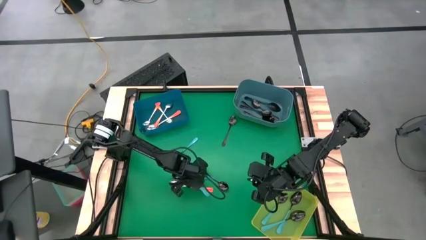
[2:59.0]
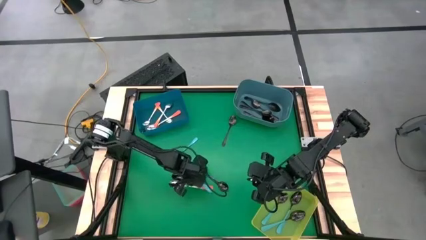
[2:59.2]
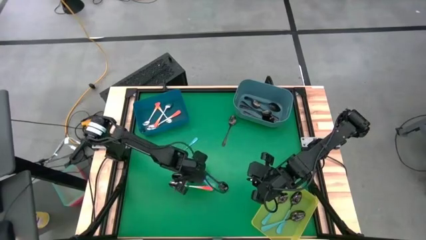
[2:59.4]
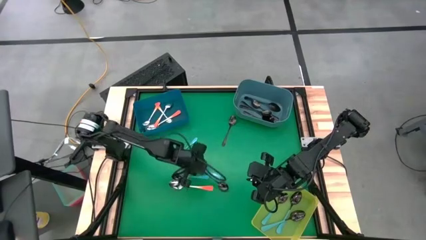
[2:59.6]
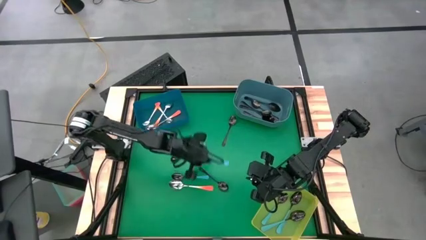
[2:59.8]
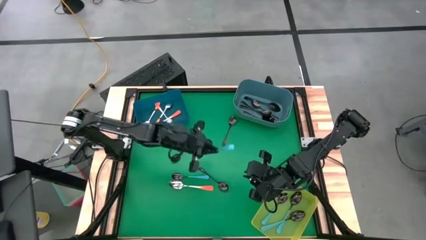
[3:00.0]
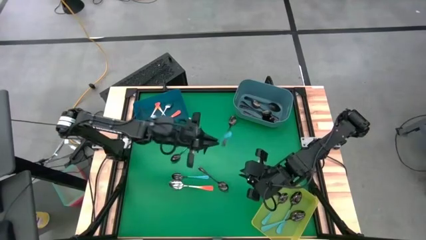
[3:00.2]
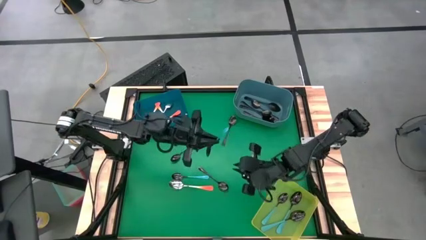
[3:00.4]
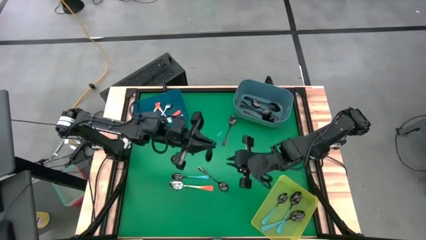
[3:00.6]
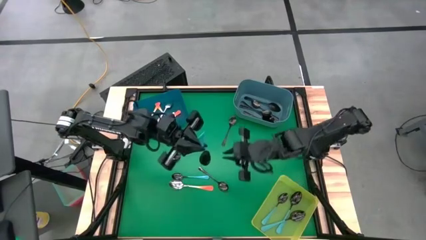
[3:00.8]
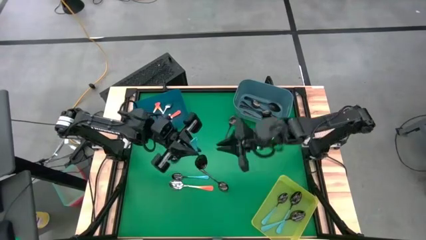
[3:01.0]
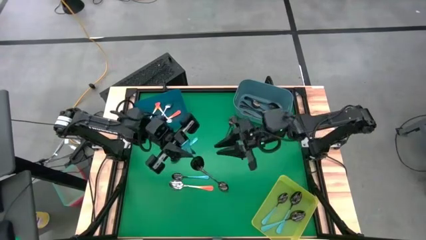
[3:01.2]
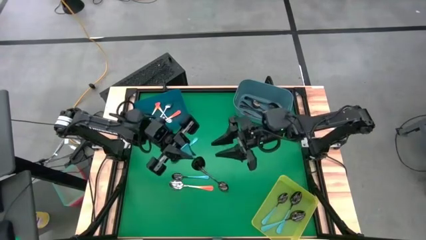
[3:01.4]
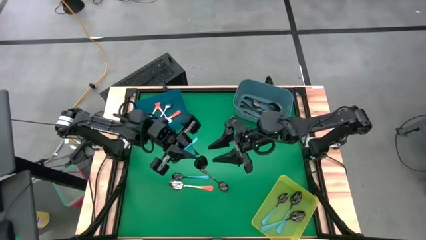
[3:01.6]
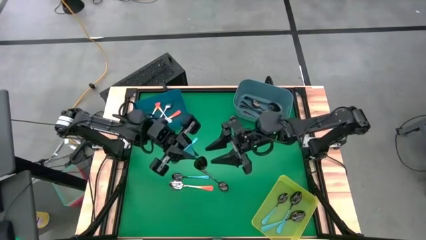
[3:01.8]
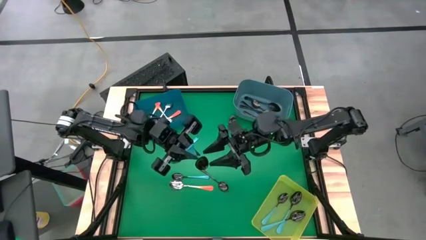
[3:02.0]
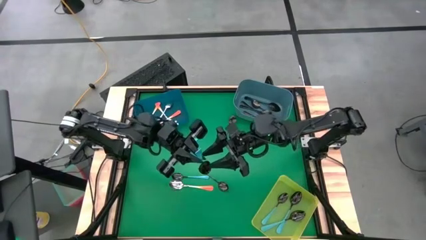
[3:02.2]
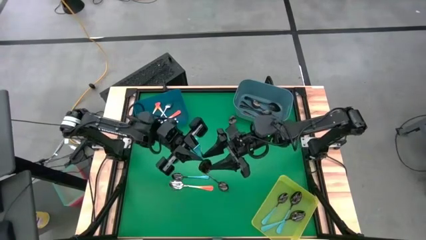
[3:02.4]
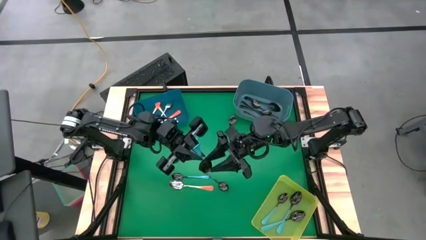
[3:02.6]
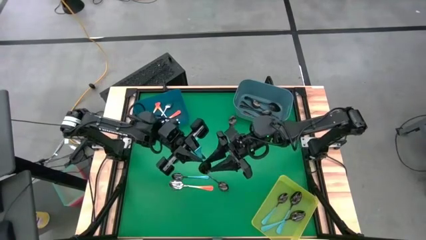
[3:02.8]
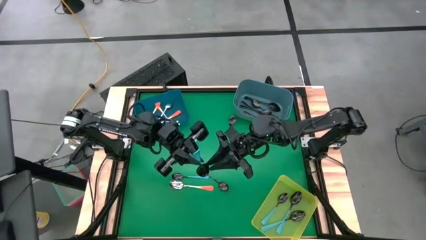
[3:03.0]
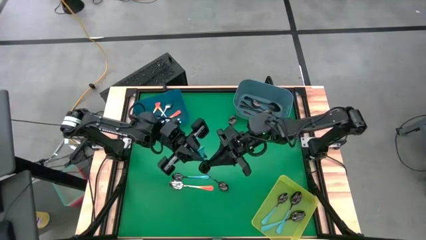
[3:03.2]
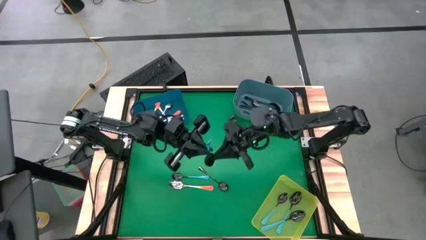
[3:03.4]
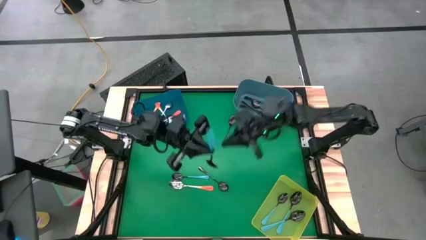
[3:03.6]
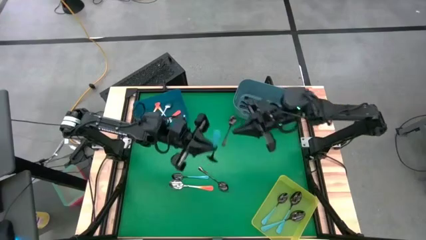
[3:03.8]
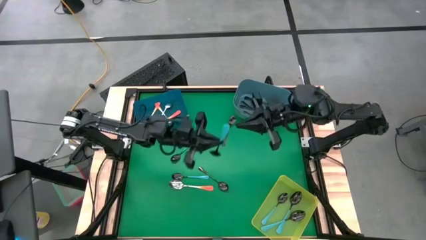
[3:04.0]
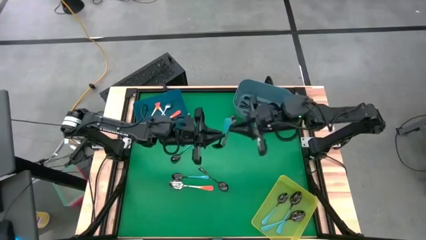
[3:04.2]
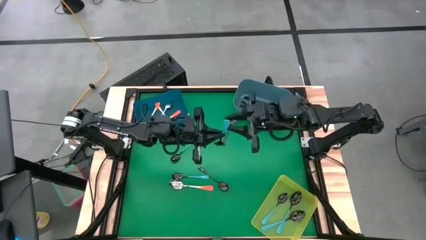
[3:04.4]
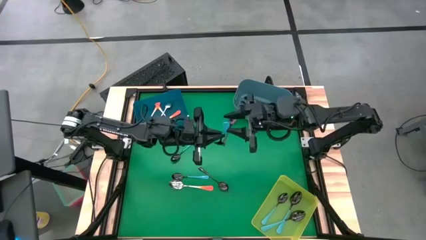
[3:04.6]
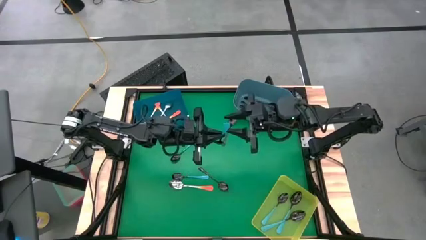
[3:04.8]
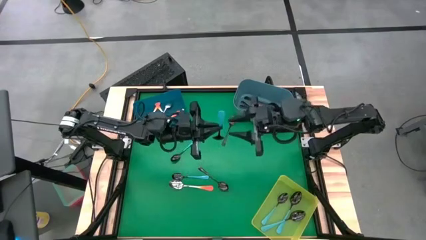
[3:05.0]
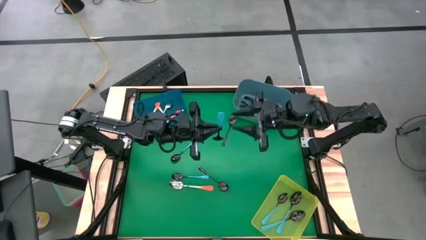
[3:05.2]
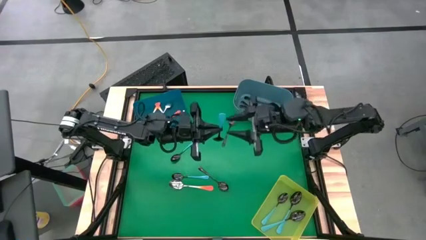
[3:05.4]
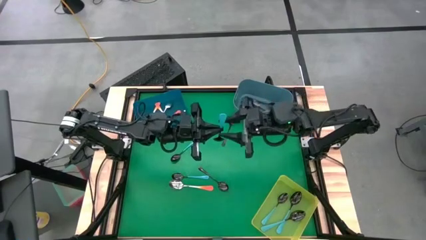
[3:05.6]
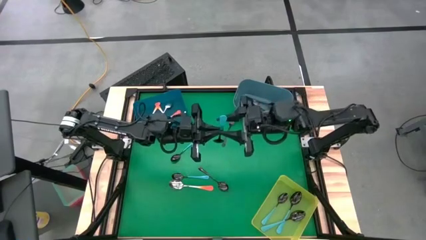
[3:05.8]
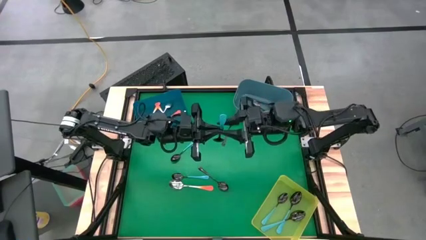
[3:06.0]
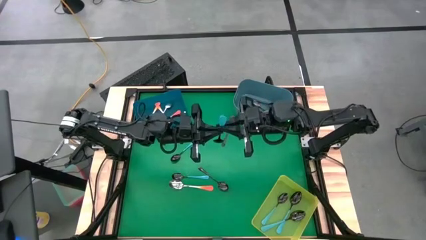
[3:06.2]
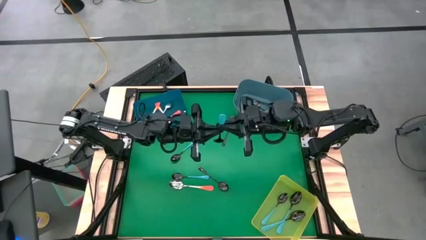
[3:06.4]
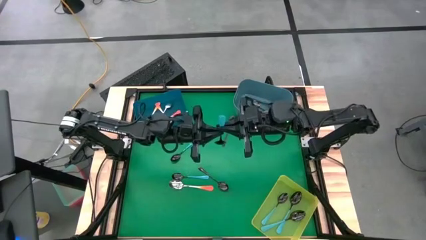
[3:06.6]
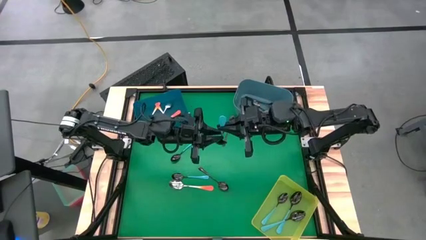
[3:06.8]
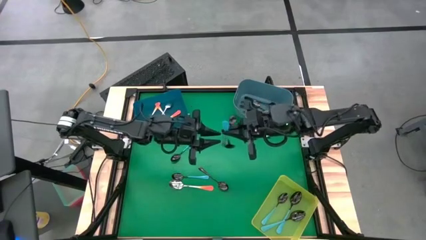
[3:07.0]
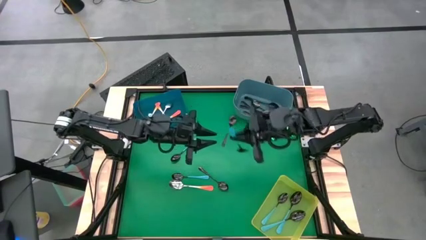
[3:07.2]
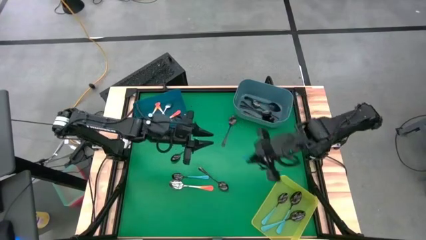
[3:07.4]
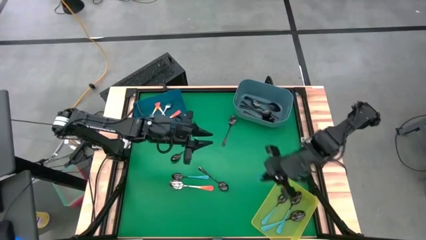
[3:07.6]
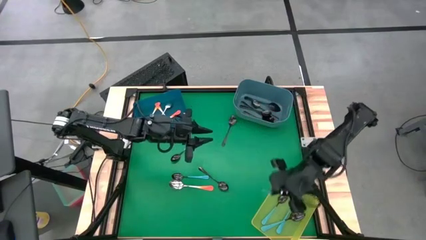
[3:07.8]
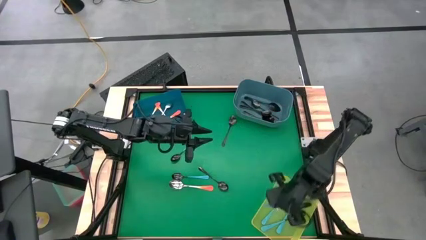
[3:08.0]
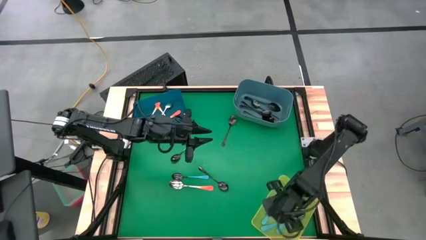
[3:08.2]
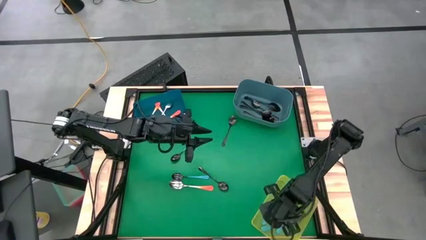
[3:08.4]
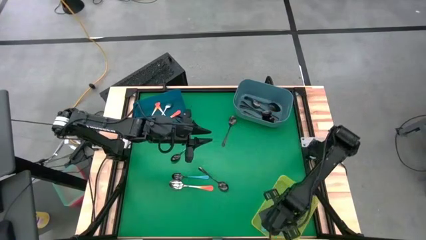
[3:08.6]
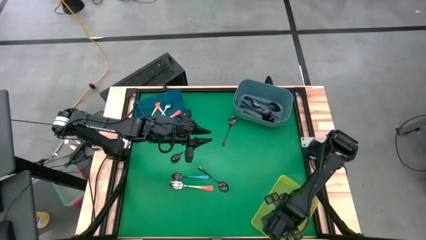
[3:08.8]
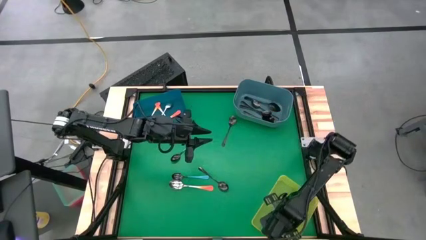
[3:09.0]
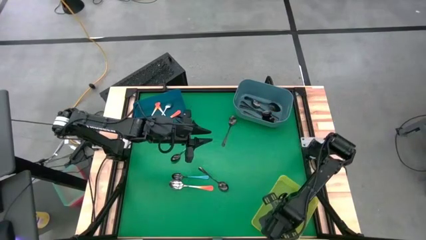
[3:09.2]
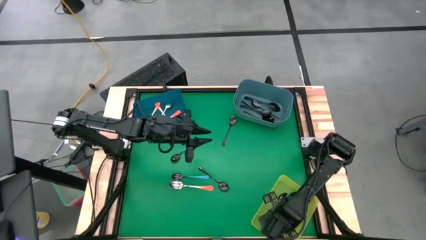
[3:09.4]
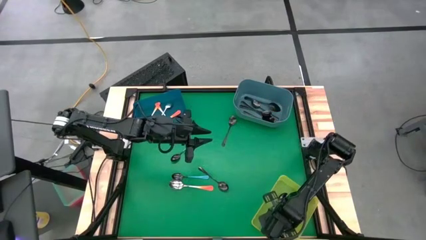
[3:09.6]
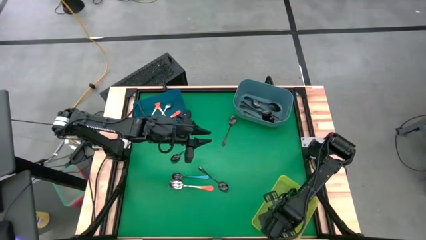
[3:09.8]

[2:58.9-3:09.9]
Task: Sort silverware by color (type)
Put the blue spoon into the yellow bin
